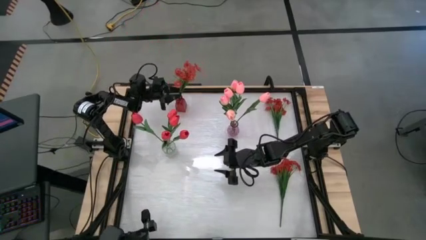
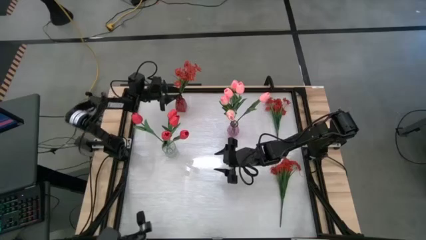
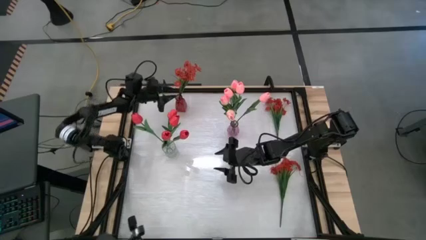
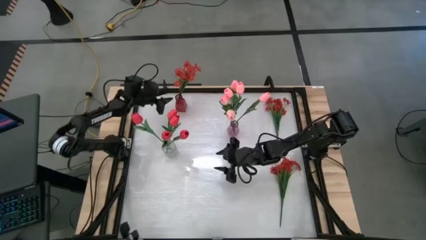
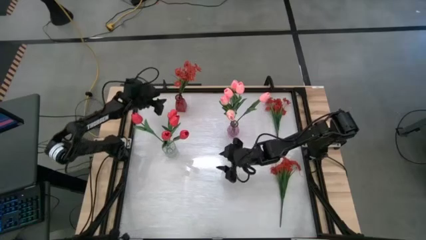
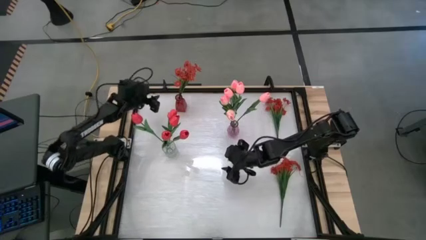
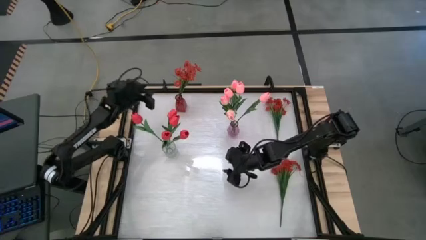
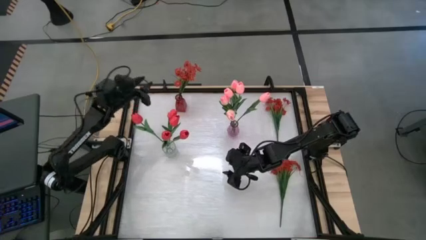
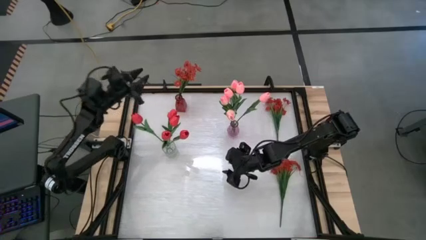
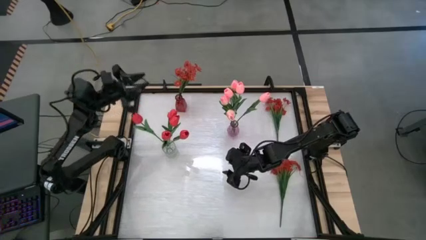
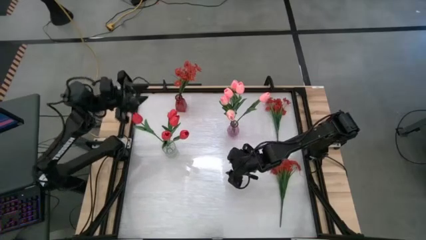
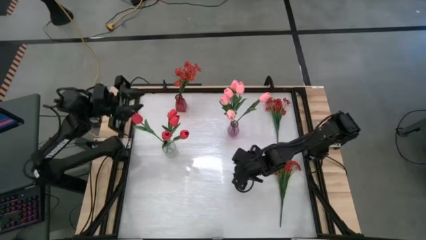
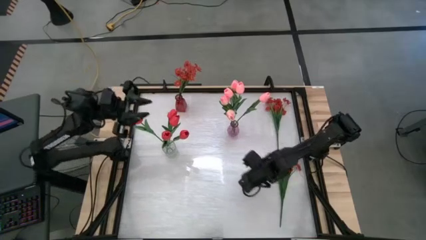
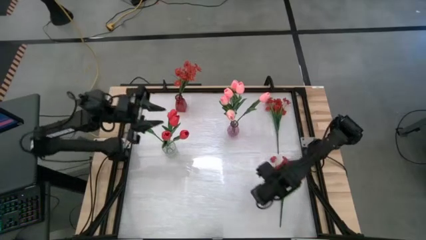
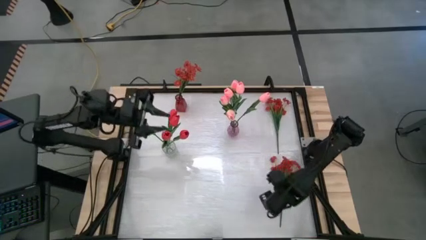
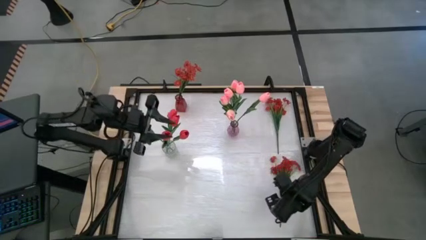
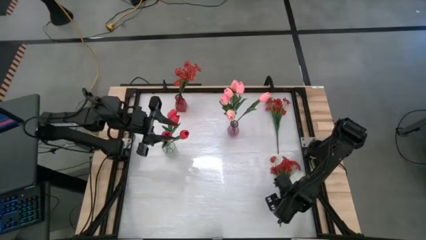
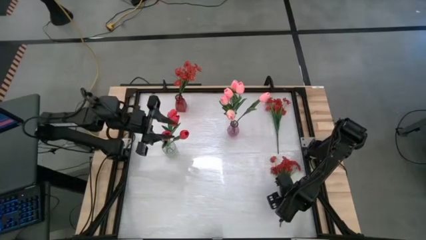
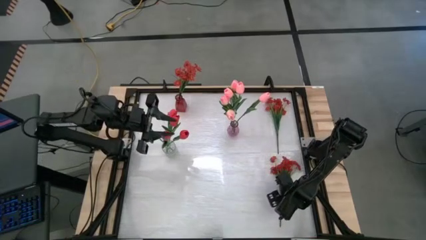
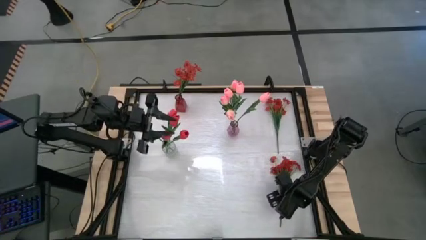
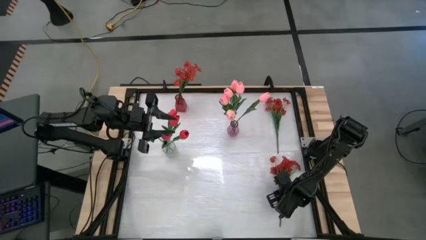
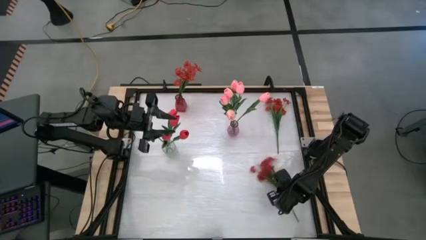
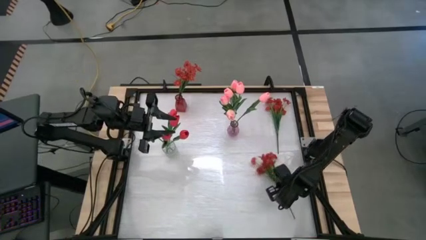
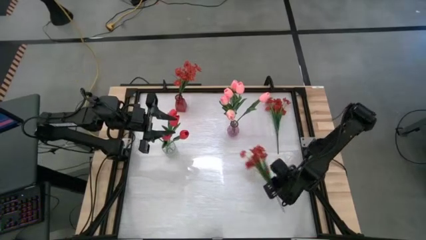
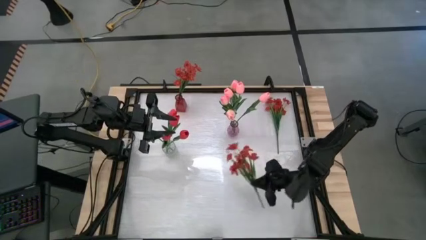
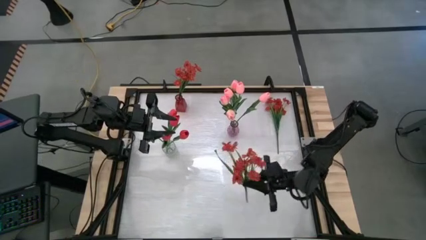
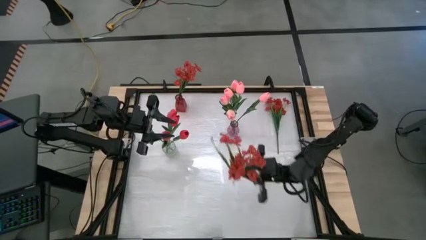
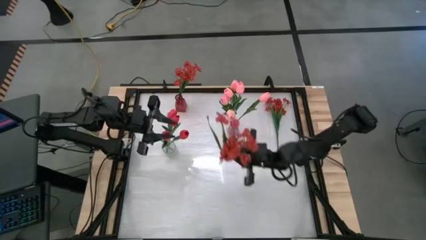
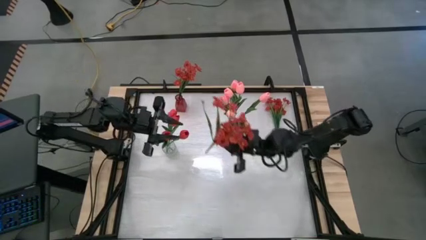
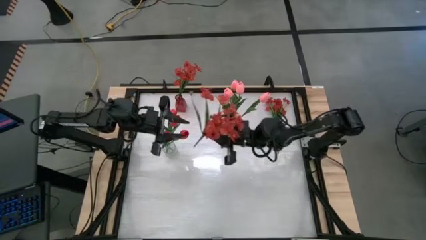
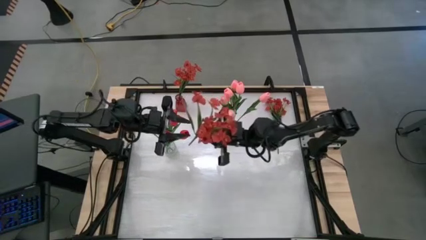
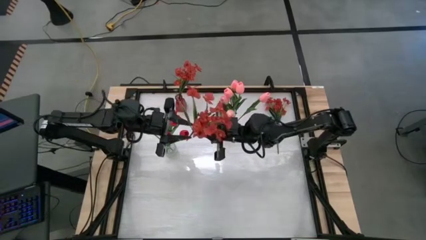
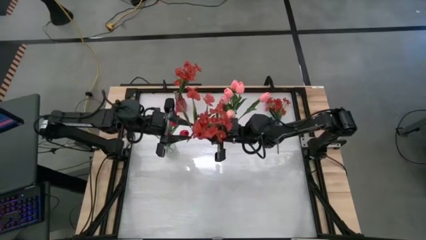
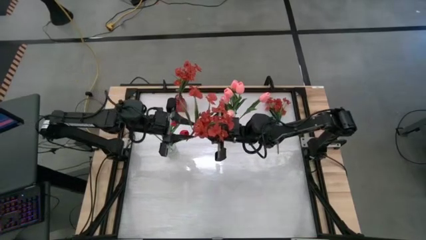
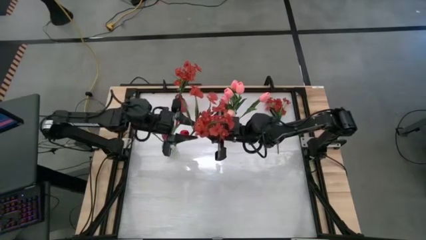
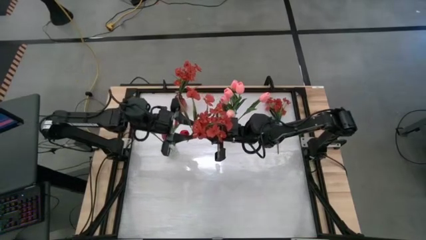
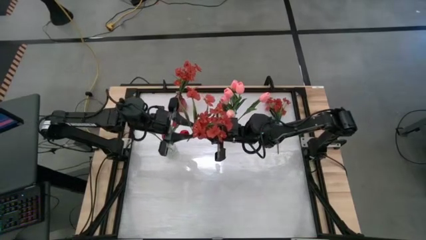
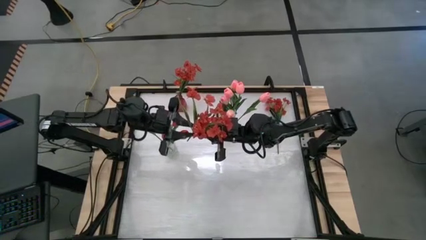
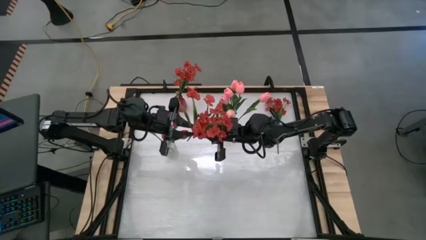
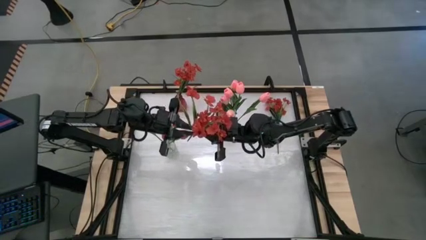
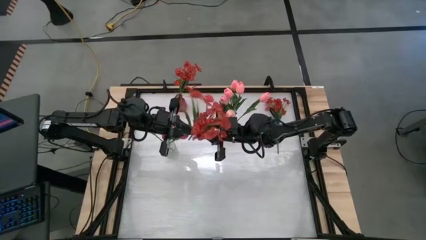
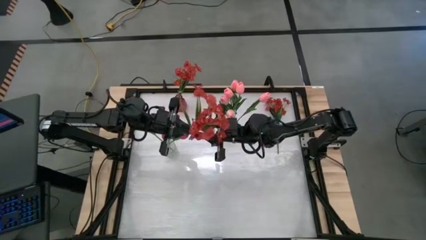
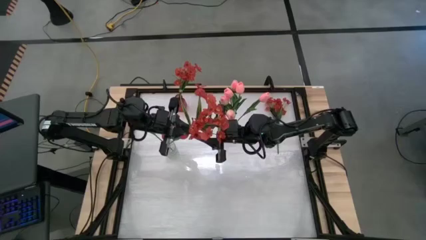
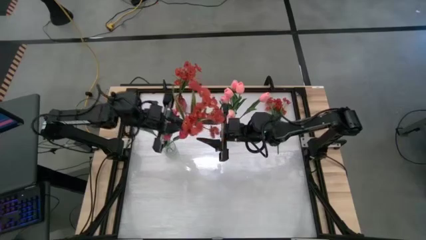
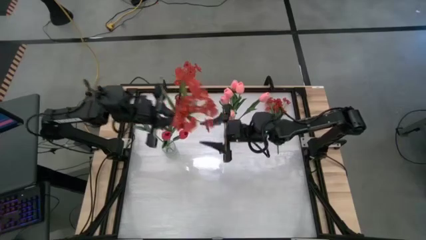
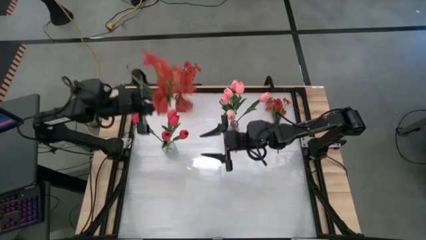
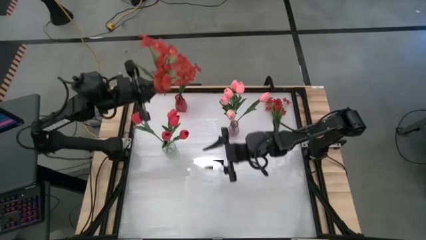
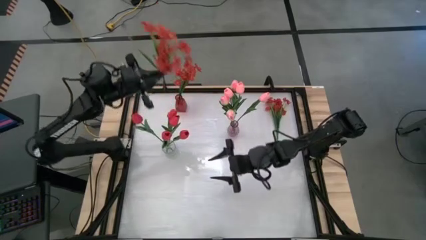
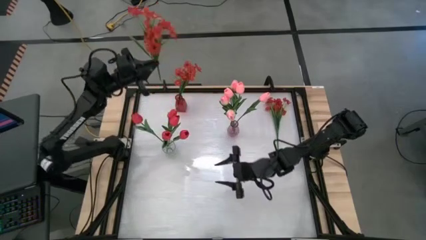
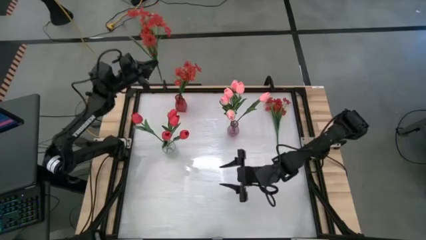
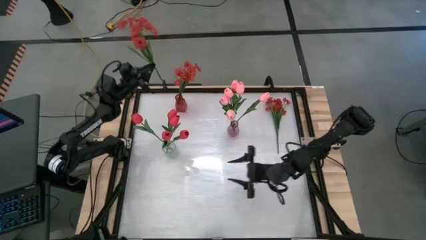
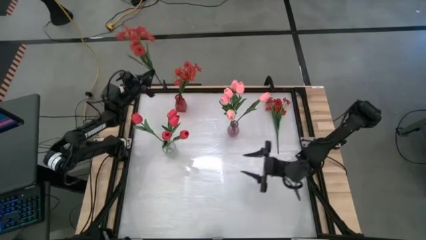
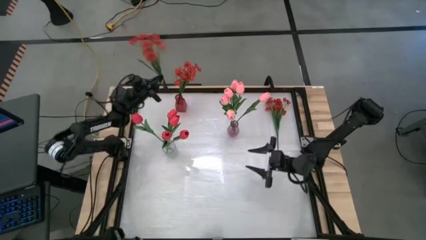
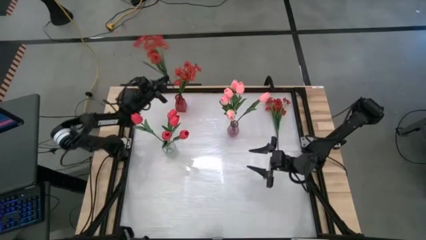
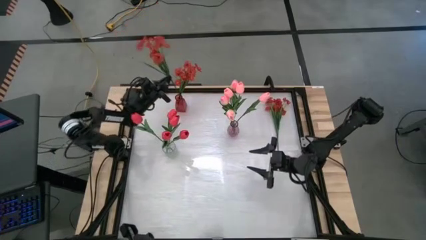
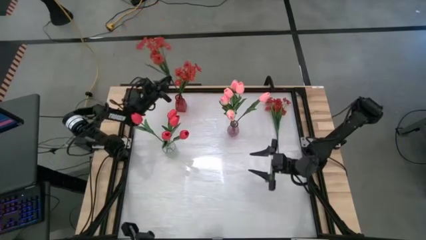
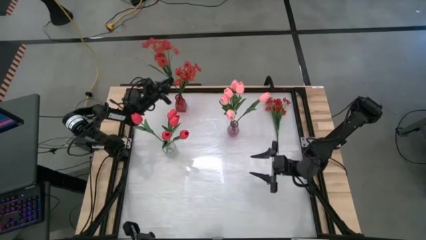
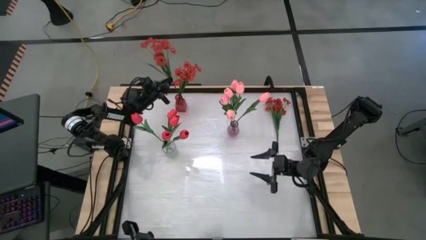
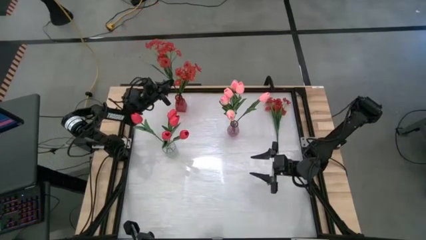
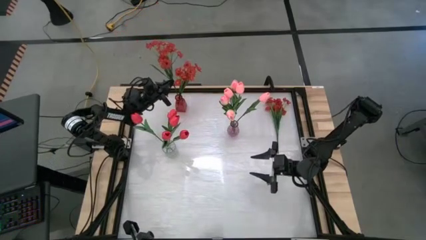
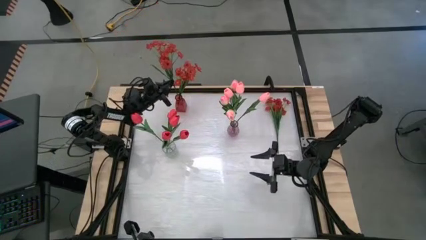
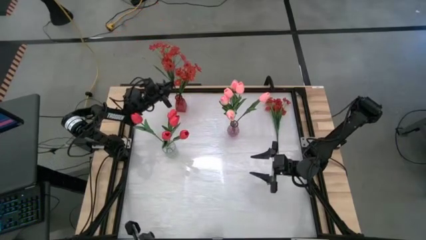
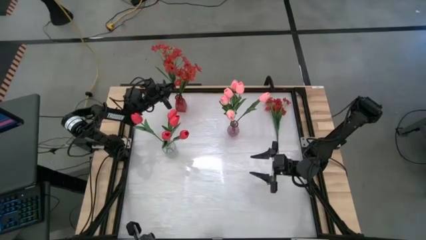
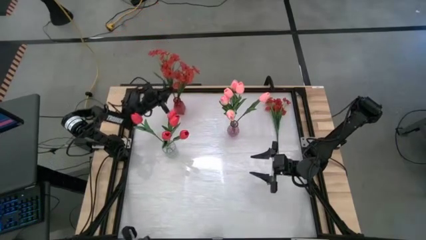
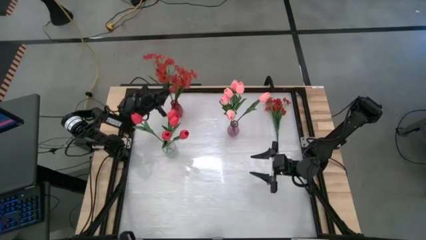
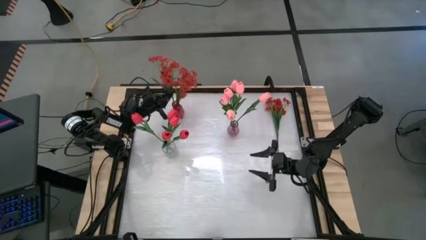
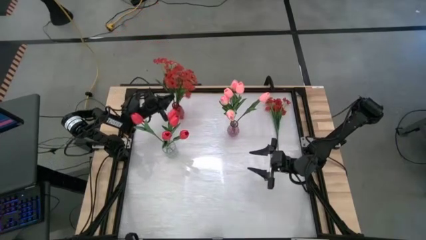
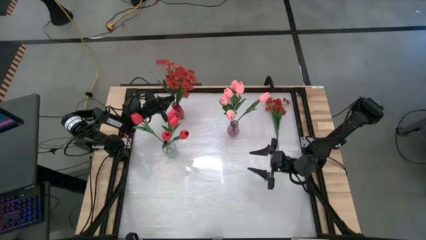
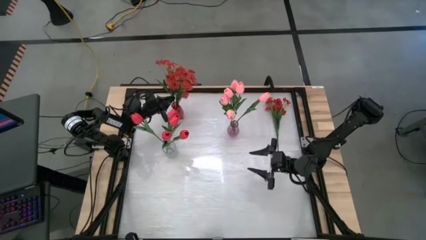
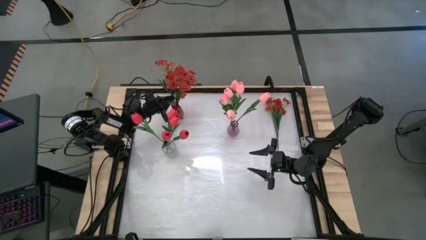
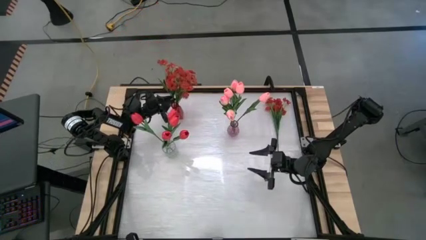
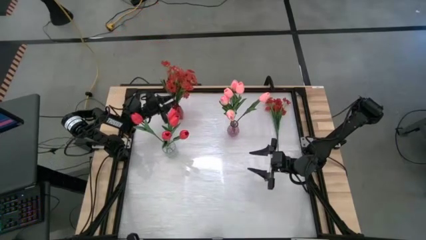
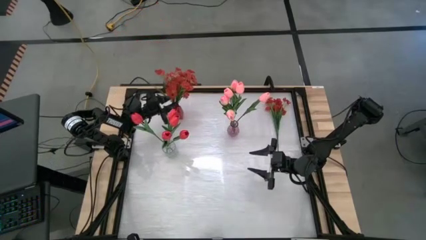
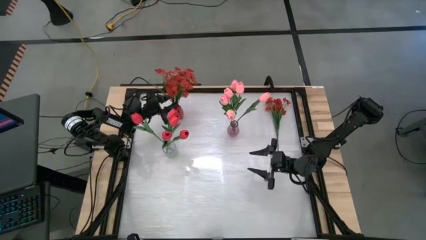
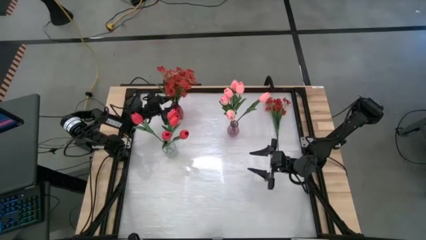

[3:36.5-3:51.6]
Task: Sort flowers into vase by color
Put the red flowers into the red vase

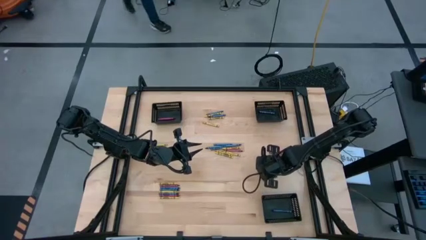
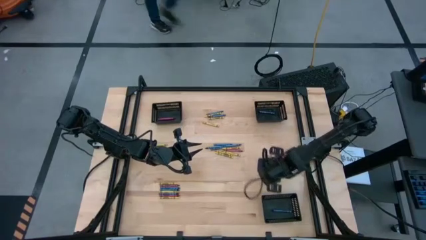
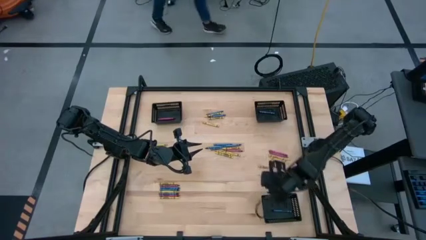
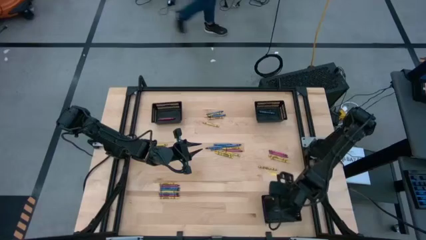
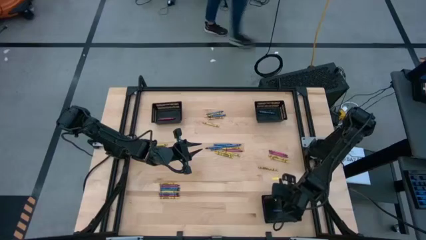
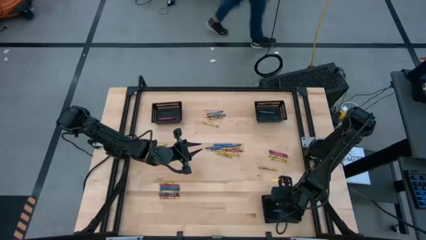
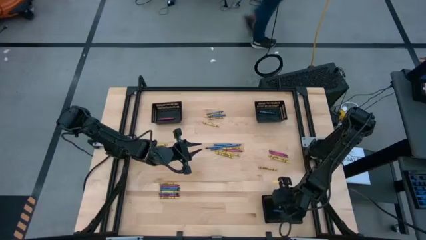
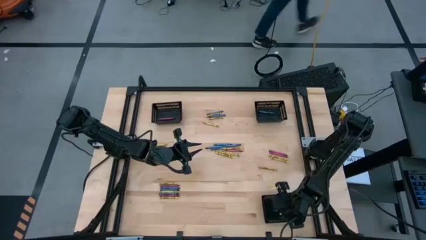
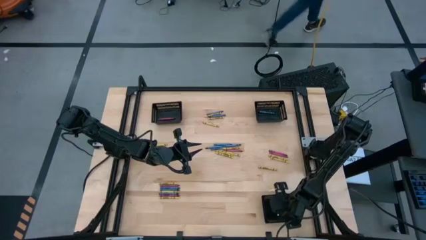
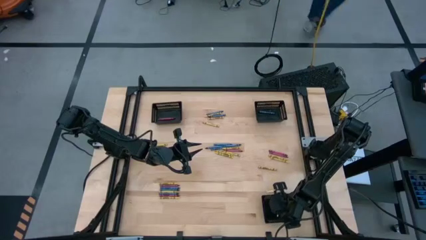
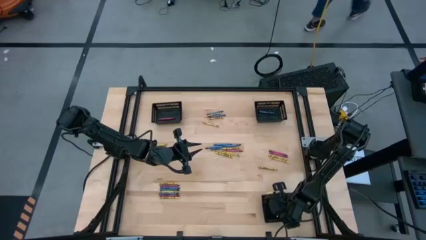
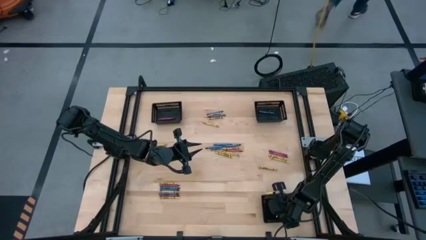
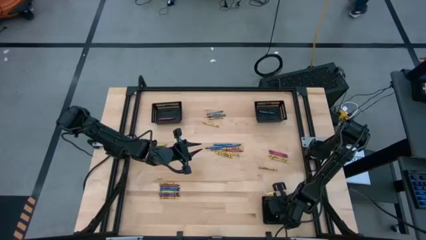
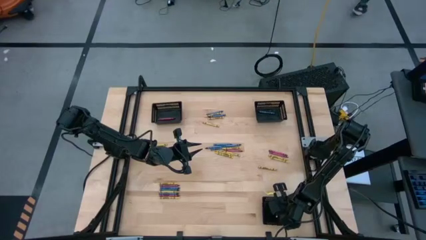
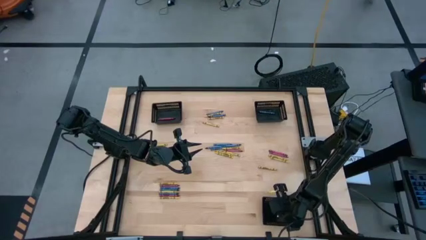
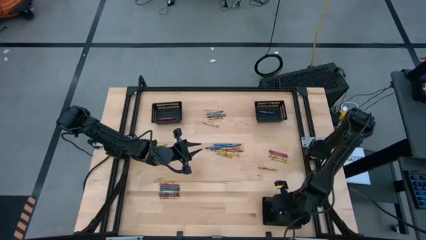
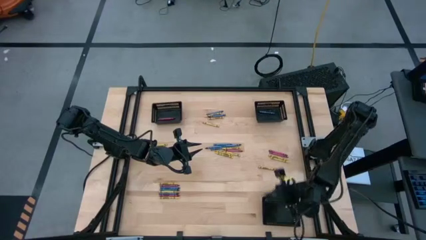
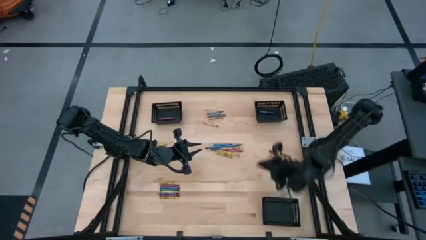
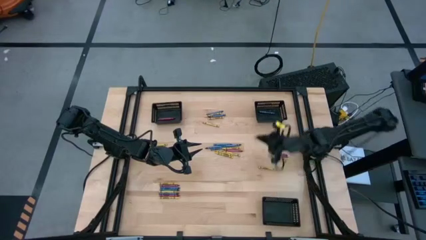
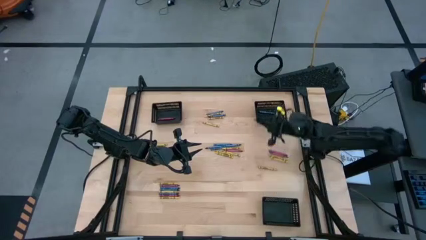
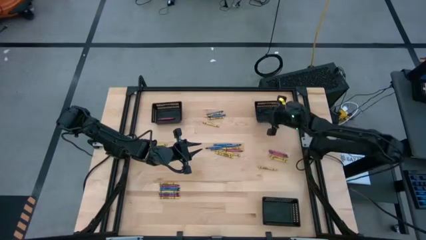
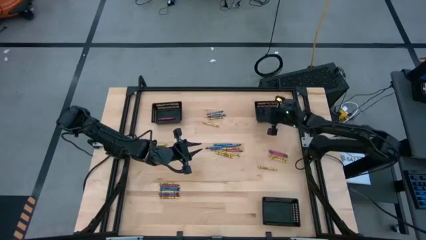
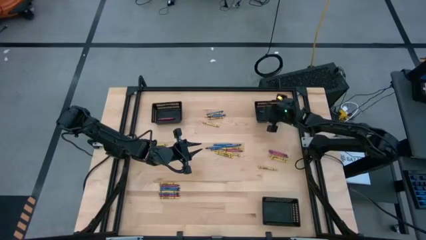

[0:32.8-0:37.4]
Task: Sort crayons
Put the blue crayon into the top right black bin
